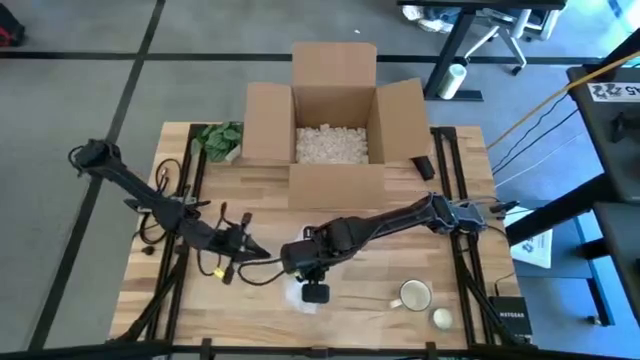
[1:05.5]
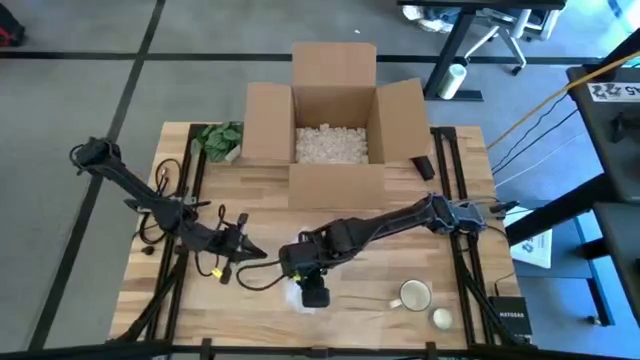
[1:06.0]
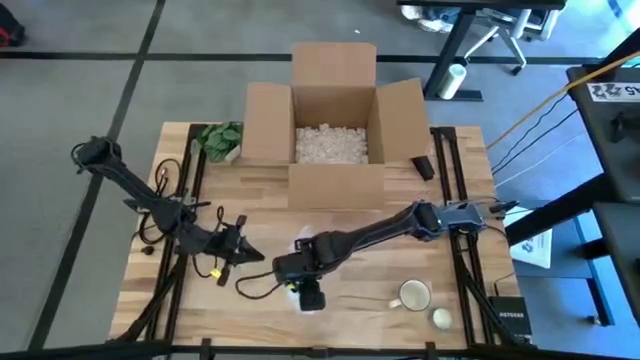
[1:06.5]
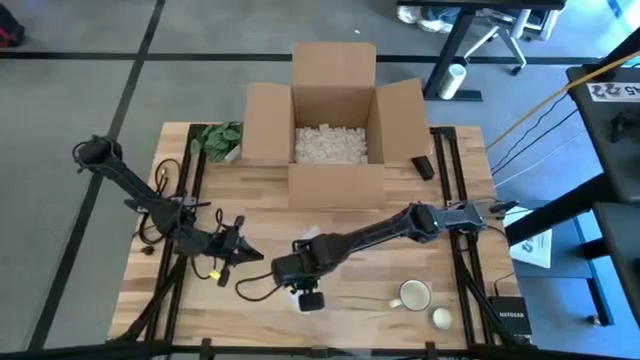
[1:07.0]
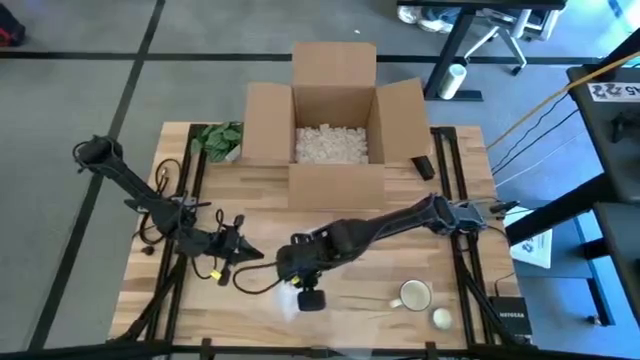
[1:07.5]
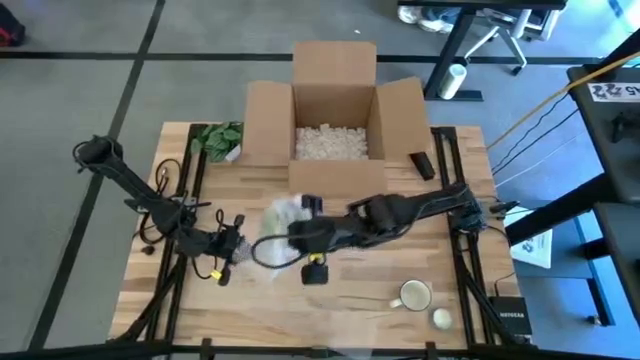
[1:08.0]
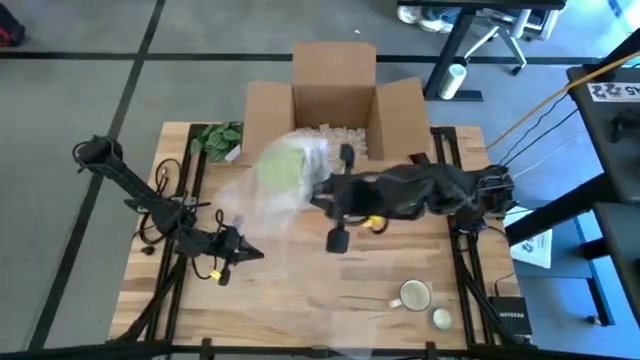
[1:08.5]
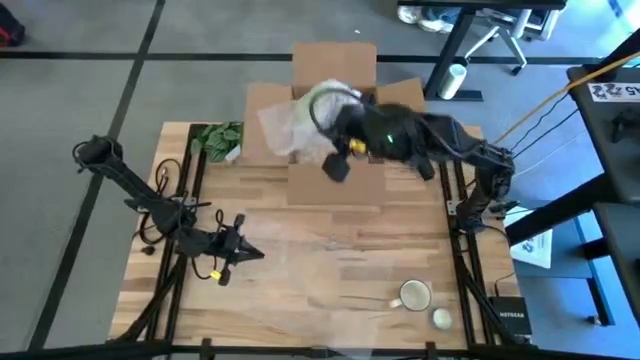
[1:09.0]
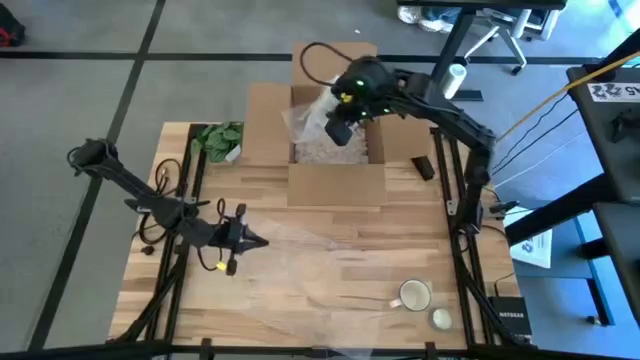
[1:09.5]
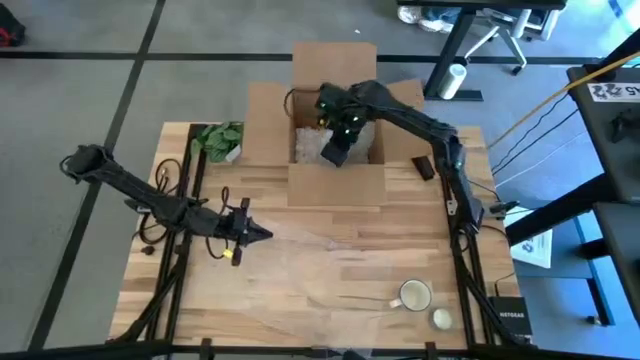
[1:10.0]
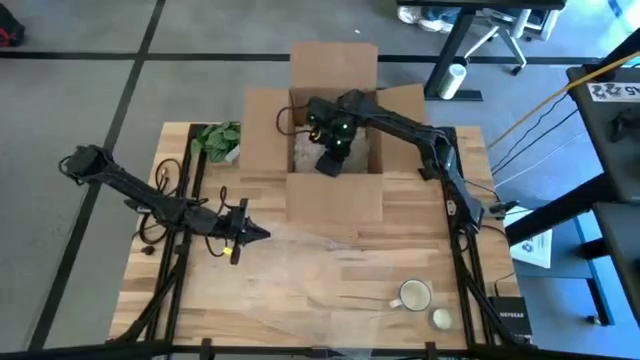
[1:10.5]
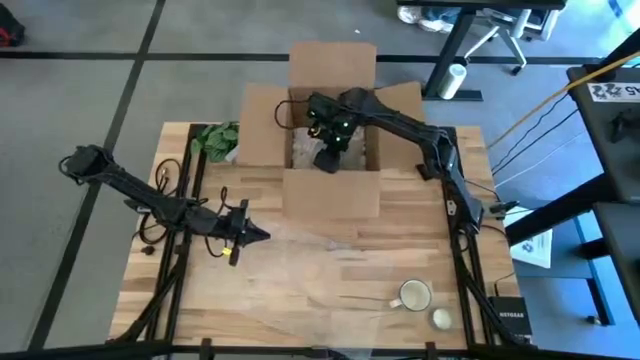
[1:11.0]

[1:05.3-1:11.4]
Task: wrap mug
Put the wrapped green mug into the cardboard box

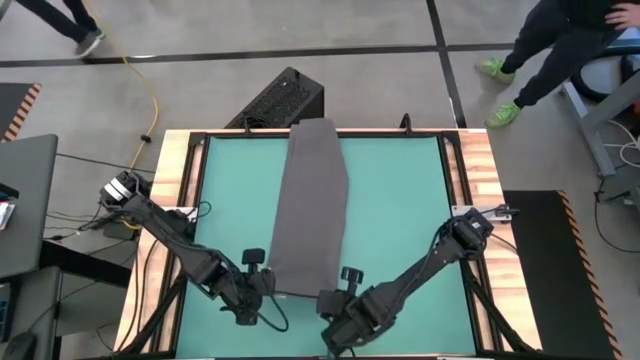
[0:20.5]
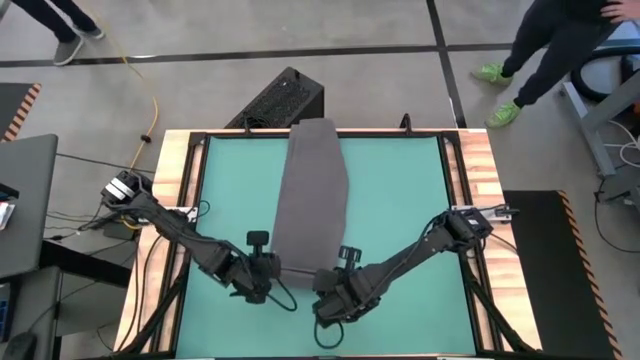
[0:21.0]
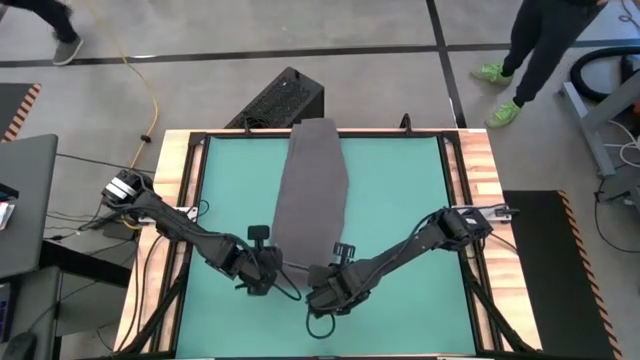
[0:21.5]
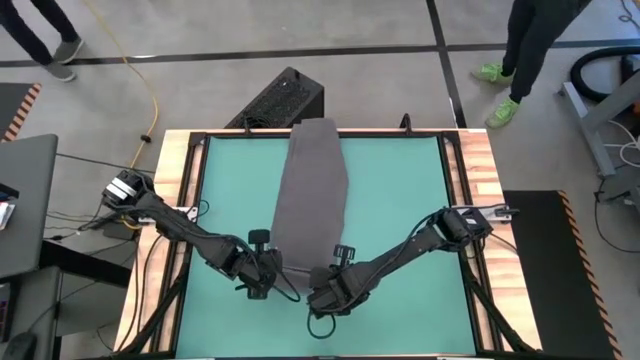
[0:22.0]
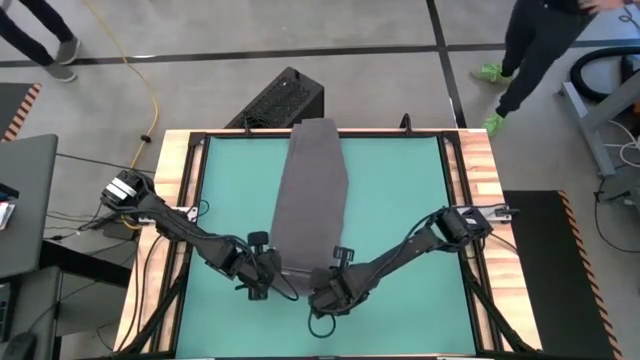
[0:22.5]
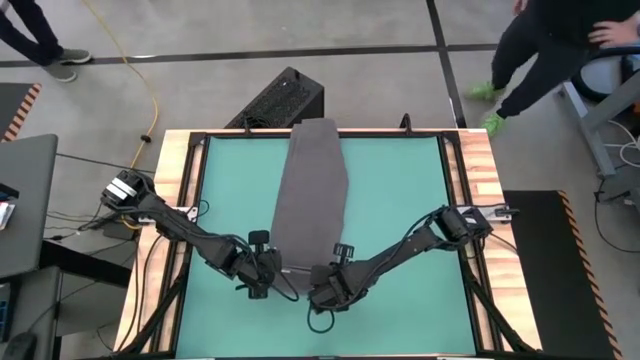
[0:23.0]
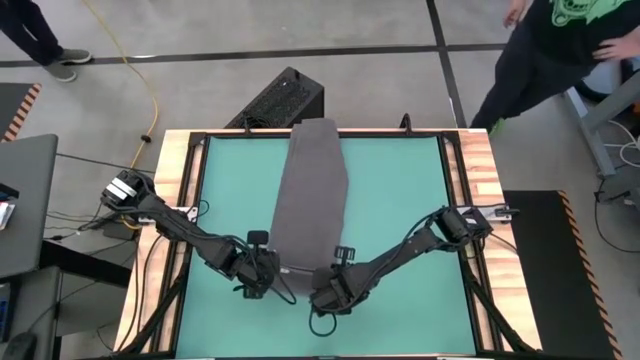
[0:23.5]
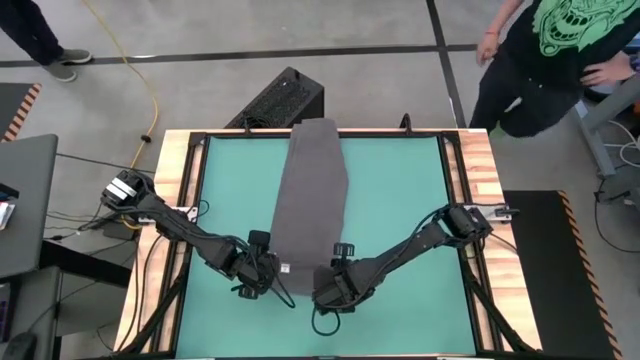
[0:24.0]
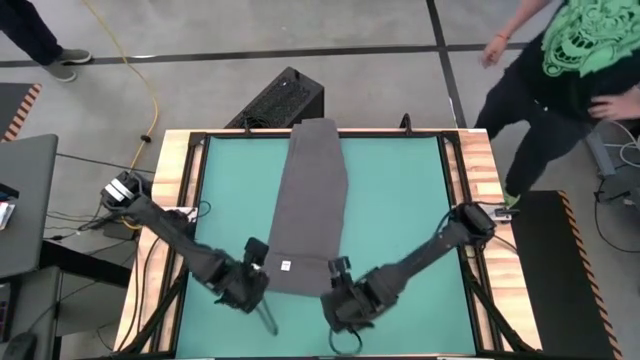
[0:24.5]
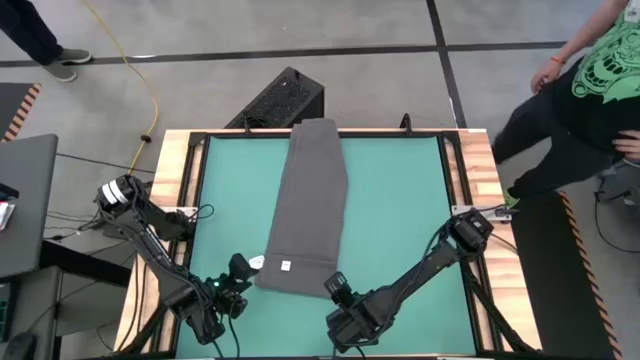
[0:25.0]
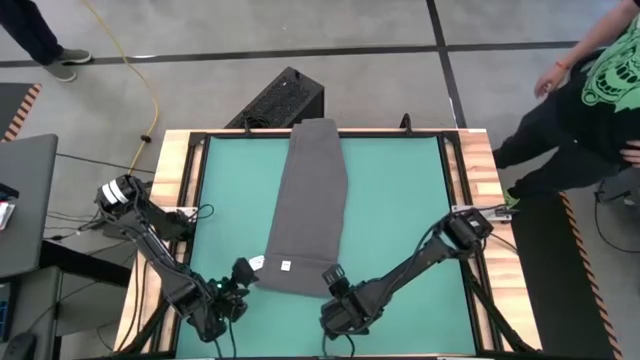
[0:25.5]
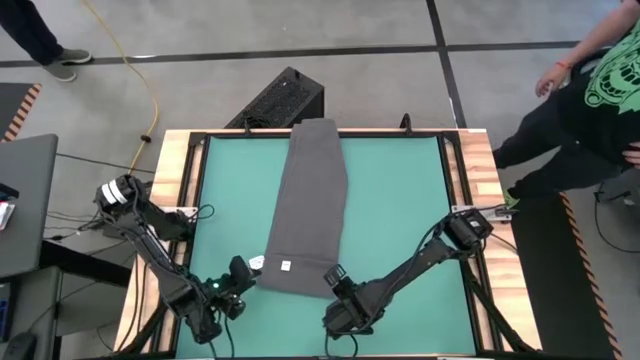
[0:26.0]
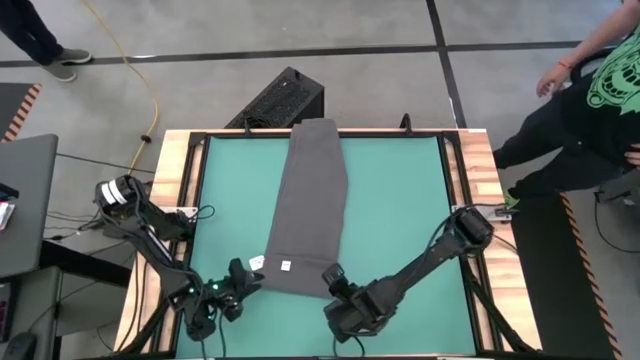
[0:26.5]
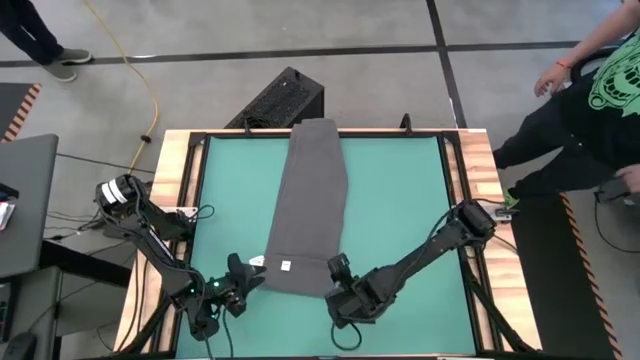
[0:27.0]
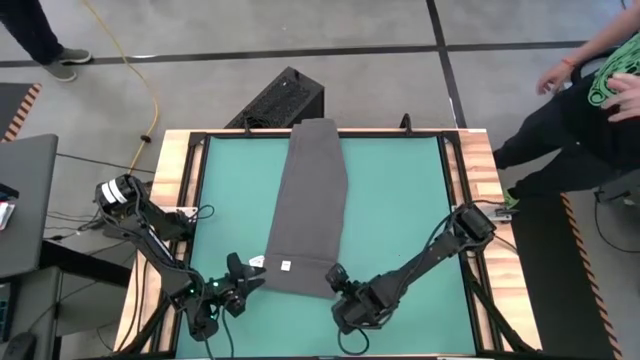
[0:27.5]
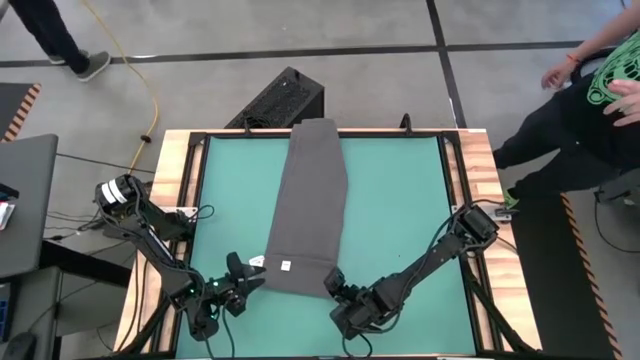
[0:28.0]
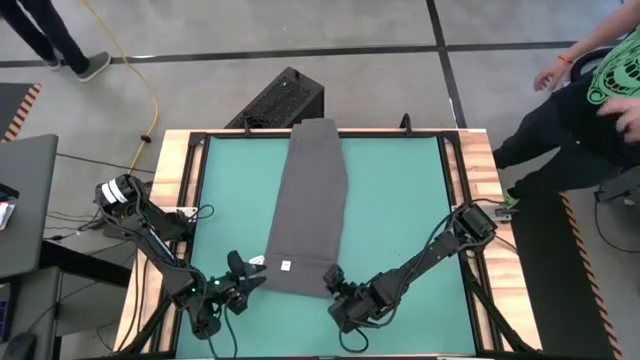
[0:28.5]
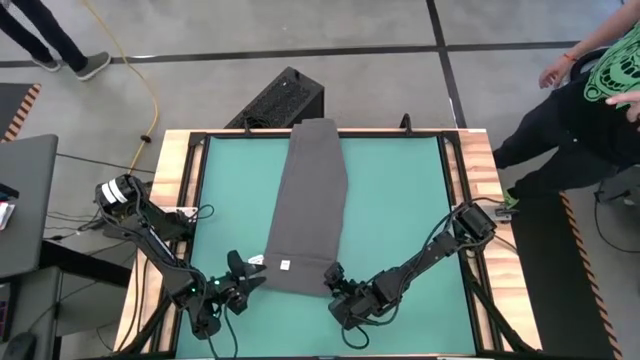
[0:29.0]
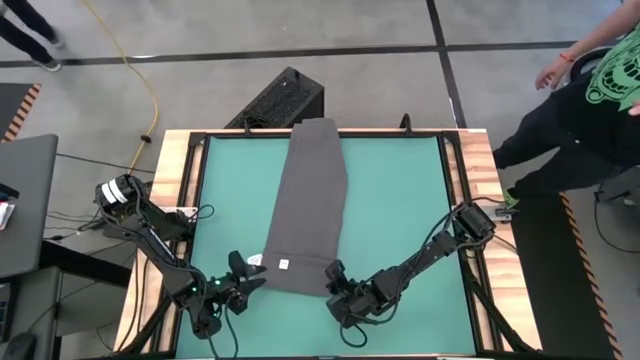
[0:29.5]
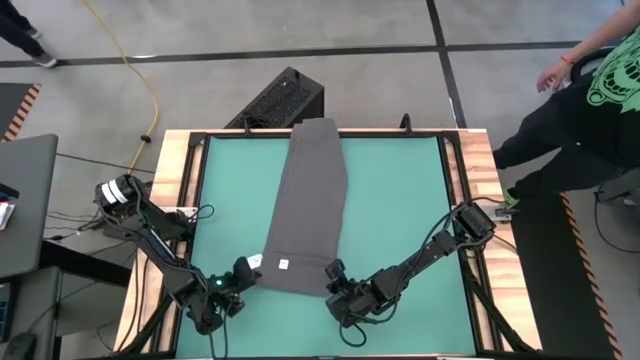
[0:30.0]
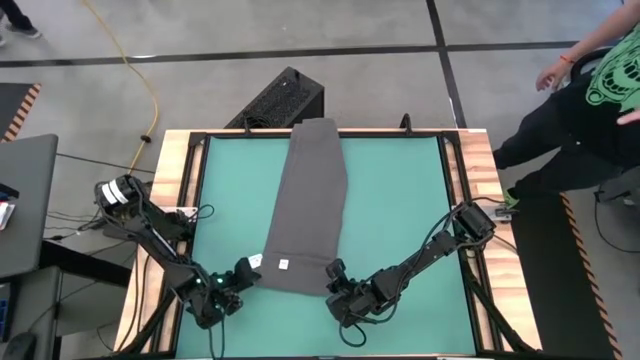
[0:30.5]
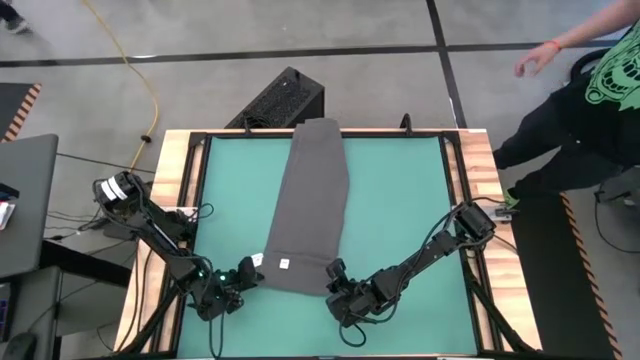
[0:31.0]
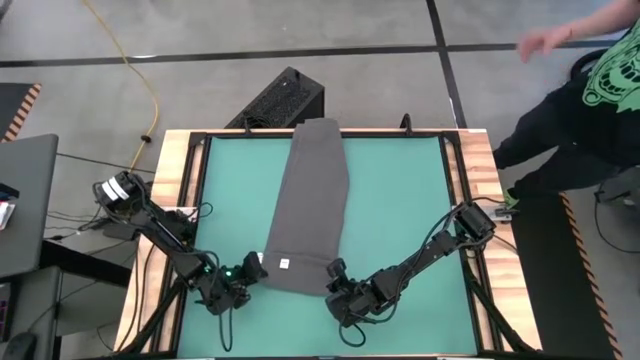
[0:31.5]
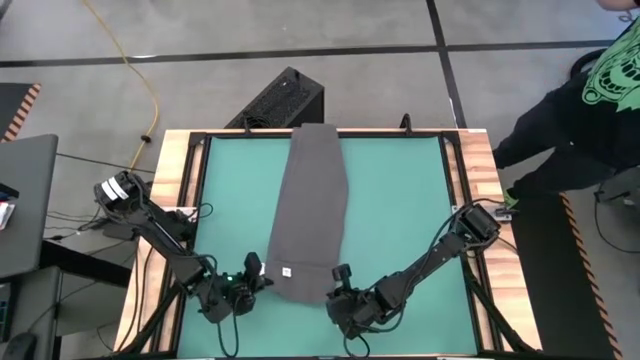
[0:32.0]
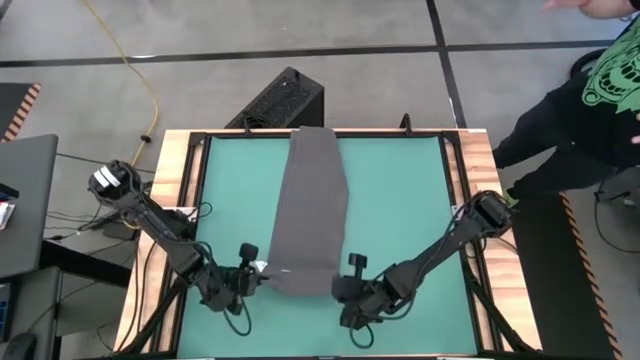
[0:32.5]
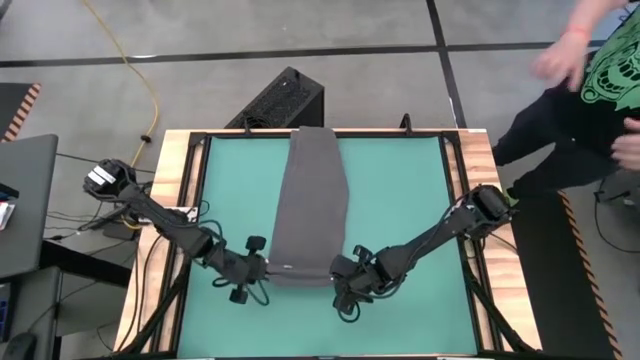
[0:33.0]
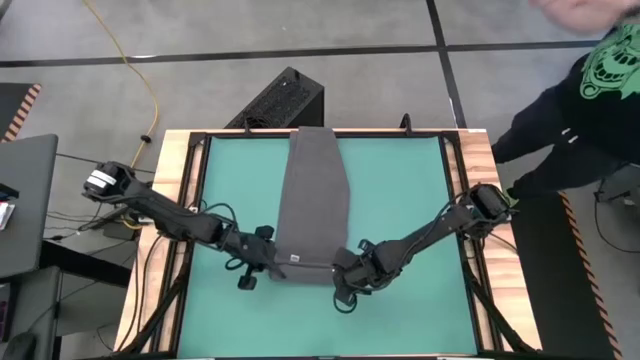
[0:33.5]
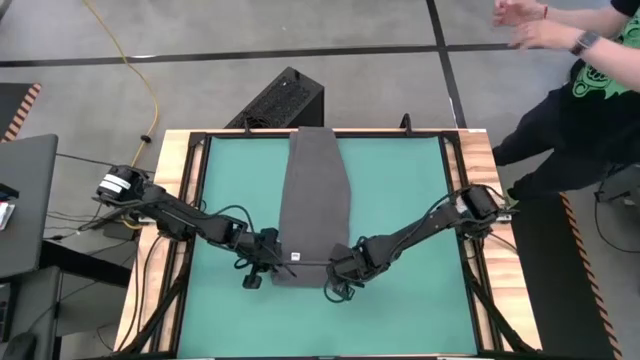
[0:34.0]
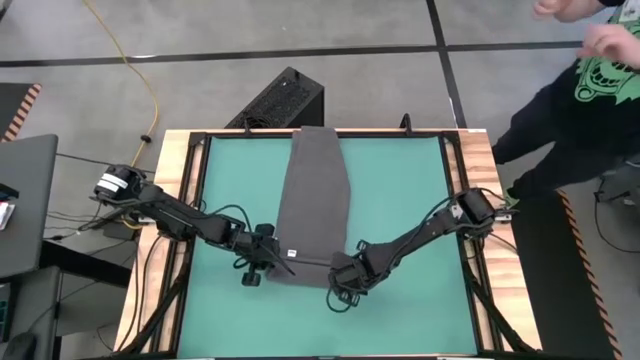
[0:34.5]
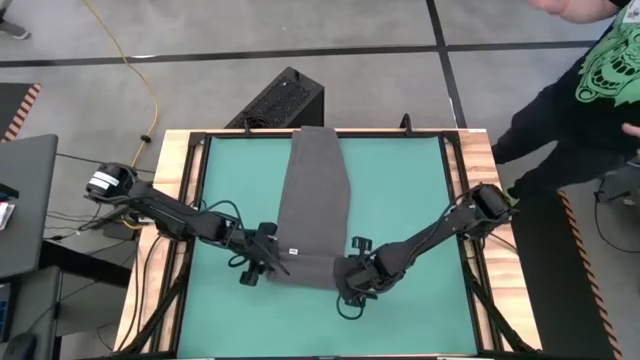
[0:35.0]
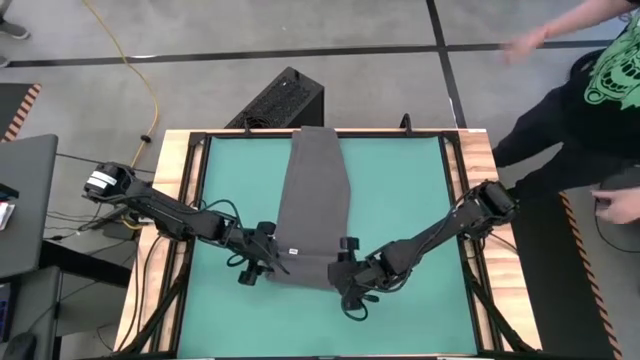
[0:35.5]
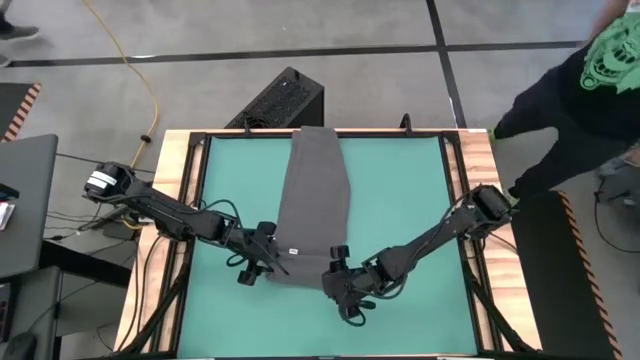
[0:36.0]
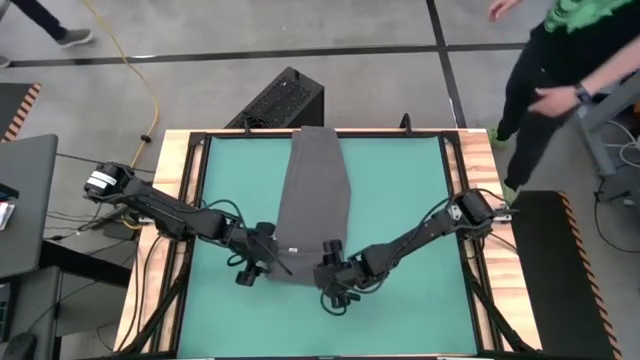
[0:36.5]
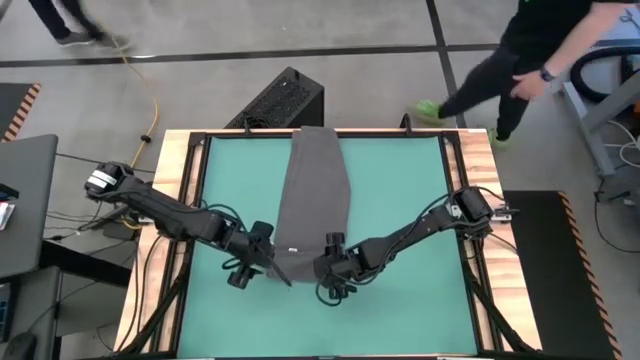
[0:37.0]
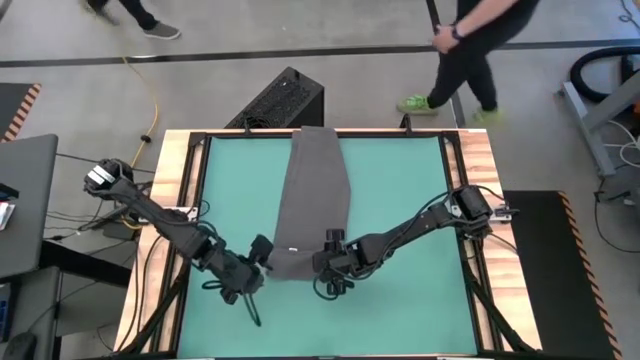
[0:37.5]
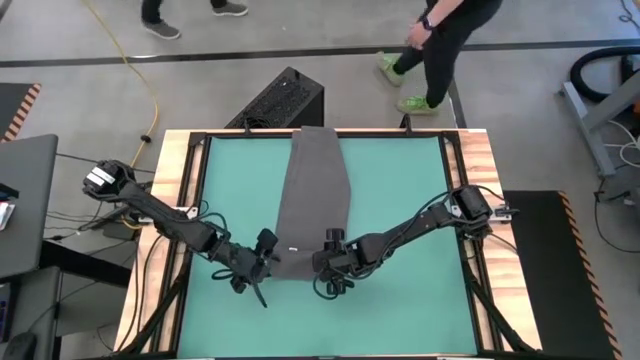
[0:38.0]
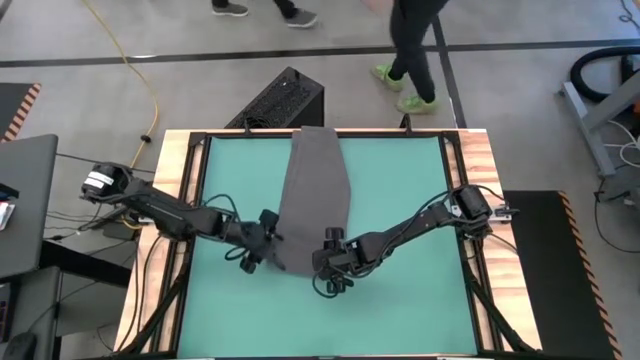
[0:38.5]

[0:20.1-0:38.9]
Task: Roll towel into tight, uniform cylinder
Roll the gray towel
